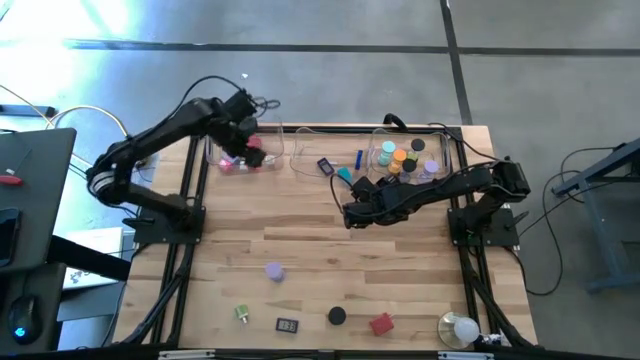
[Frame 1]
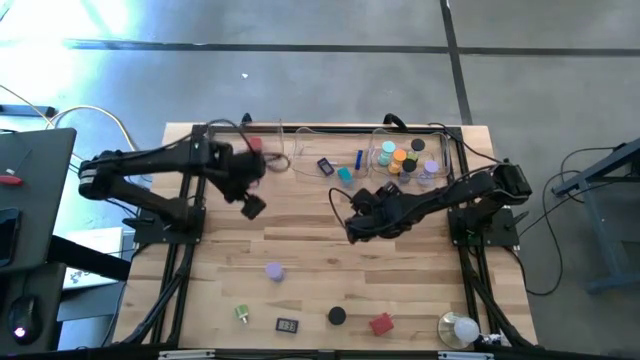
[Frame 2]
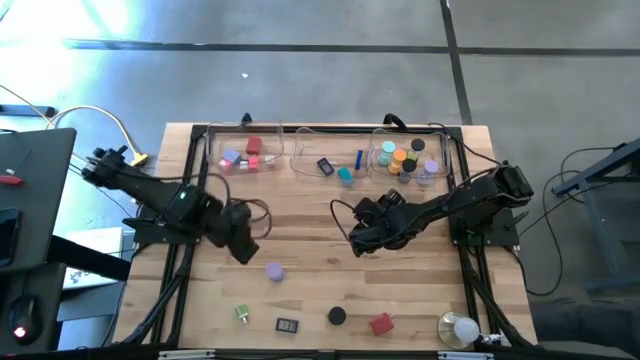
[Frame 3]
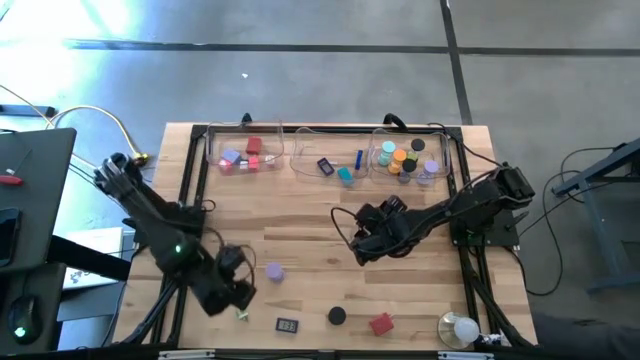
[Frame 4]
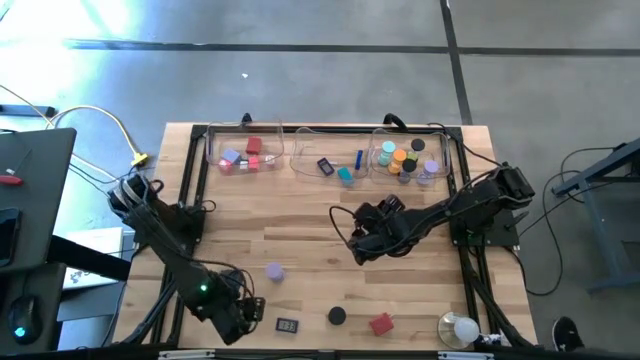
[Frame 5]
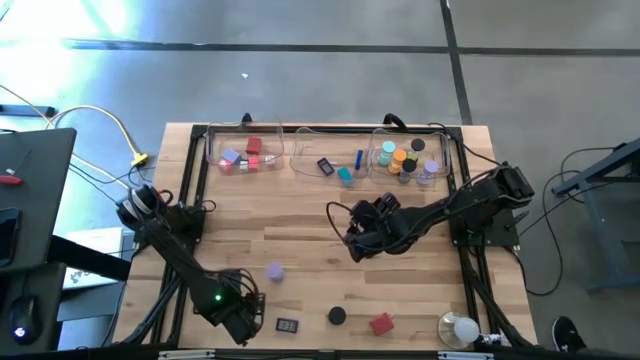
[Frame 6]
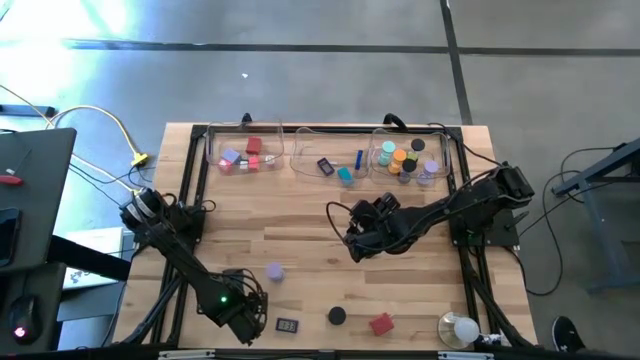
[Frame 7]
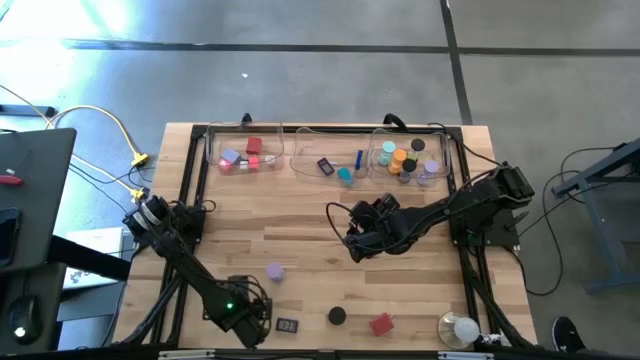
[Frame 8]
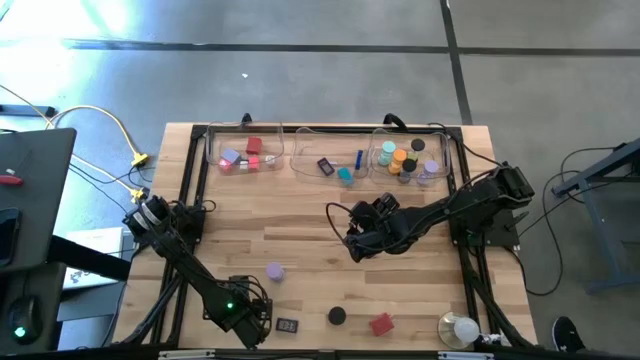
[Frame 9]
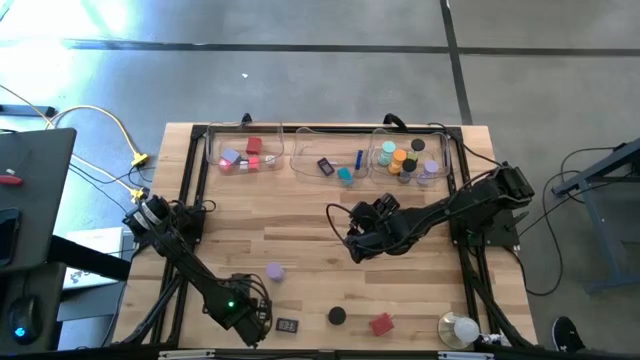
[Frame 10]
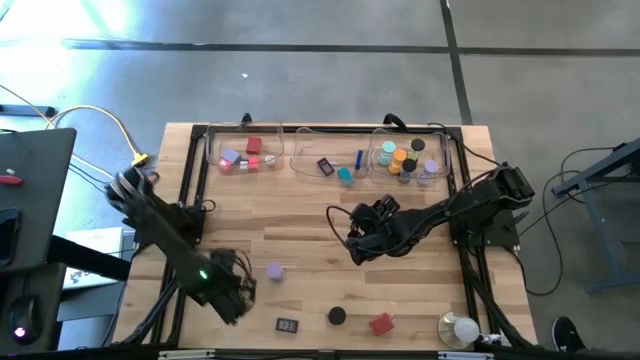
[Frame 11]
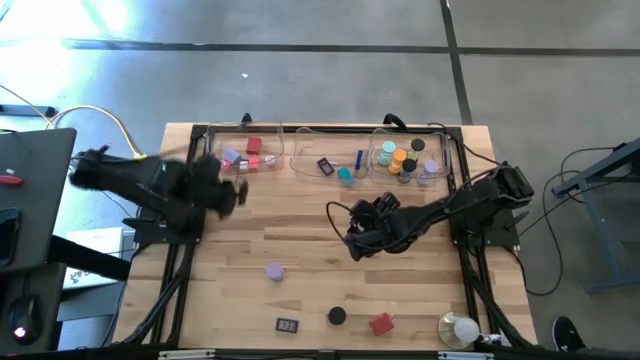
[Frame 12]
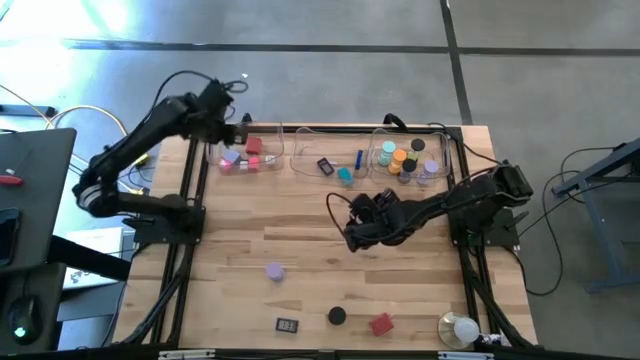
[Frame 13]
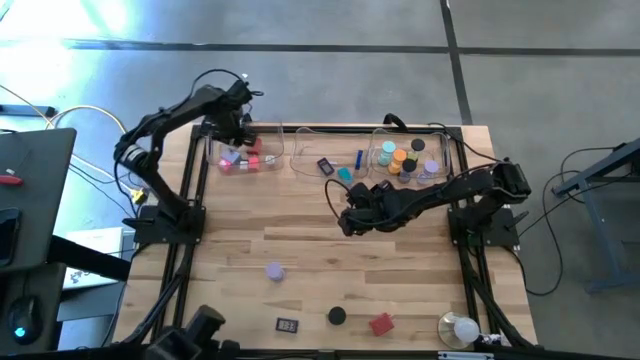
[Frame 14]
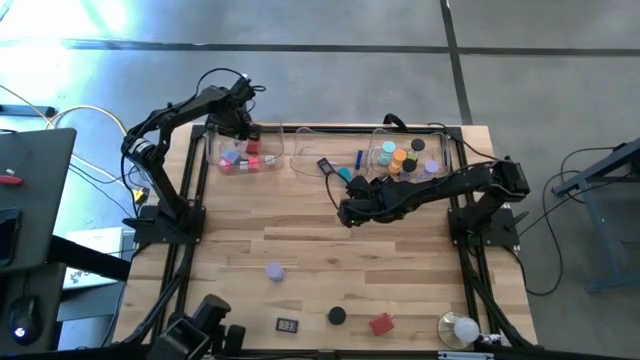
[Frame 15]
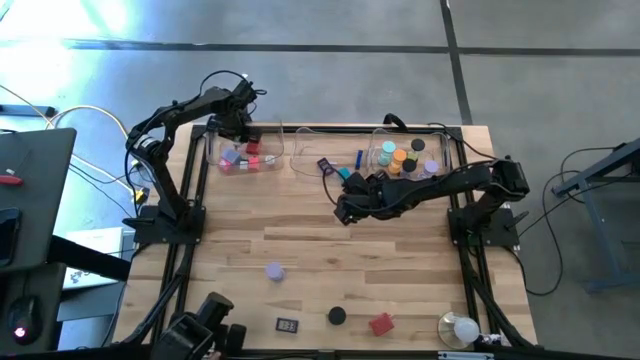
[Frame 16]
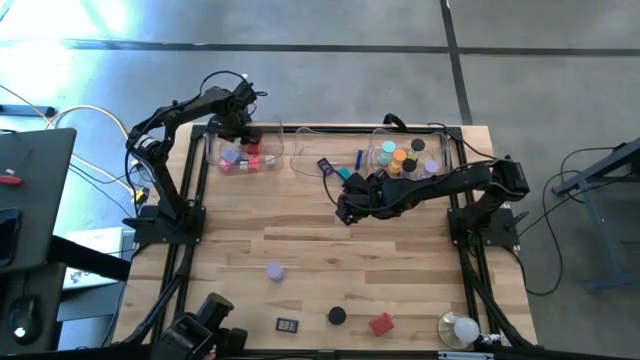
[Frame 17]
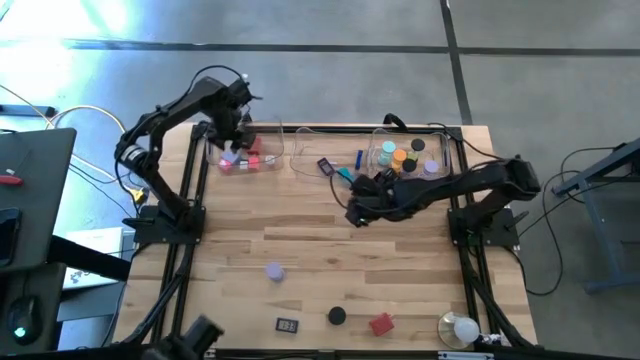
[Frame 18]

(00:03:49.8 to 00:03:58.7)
Task: Pick & Place Office items
Put the green charger adapter into the left transparent bin

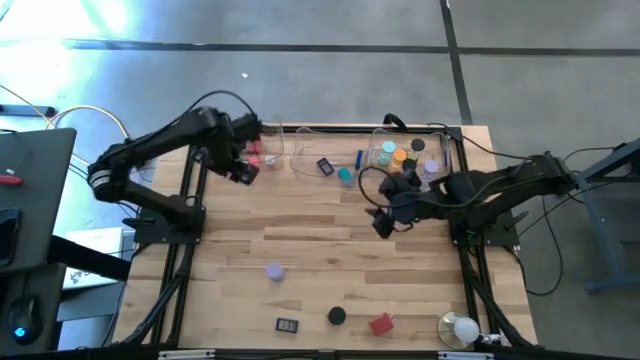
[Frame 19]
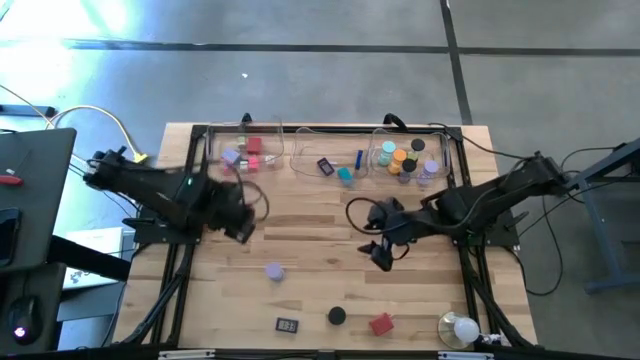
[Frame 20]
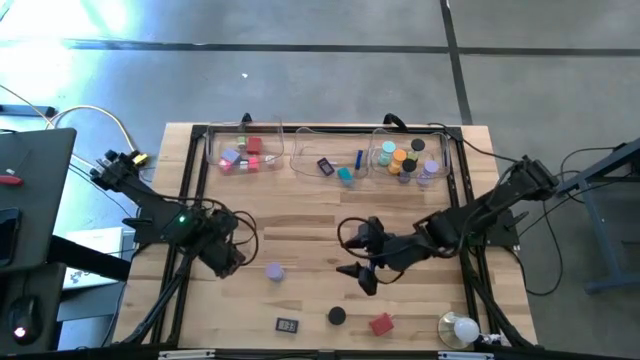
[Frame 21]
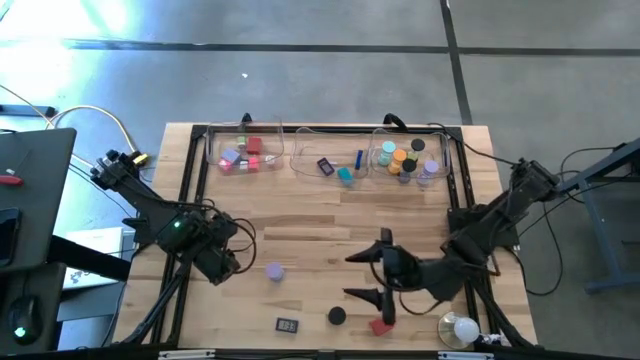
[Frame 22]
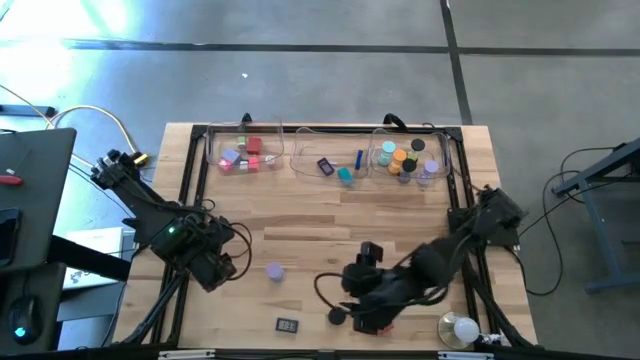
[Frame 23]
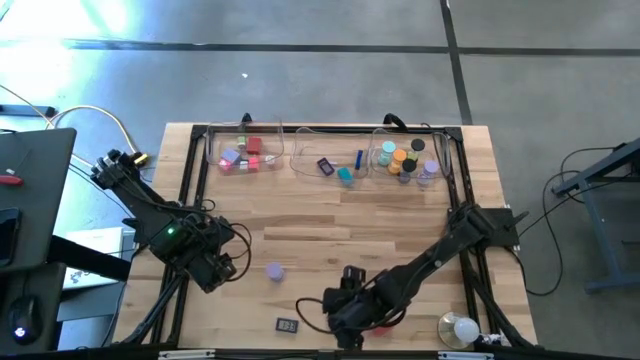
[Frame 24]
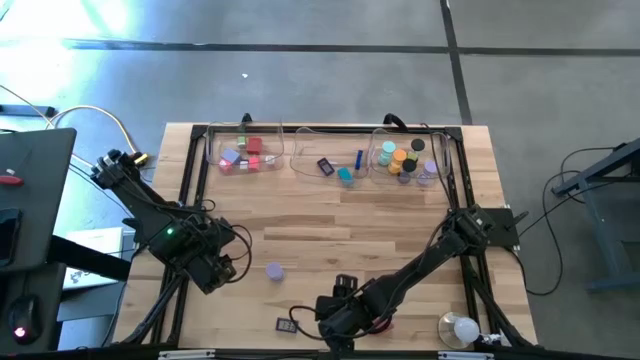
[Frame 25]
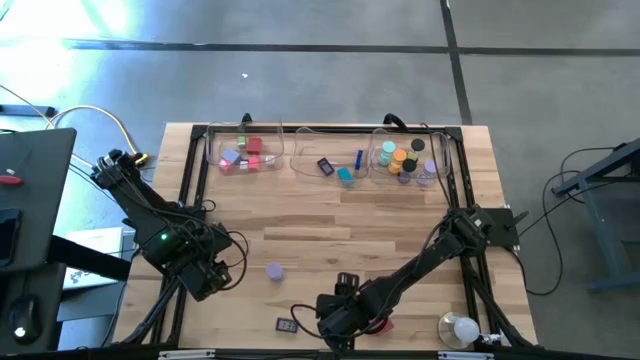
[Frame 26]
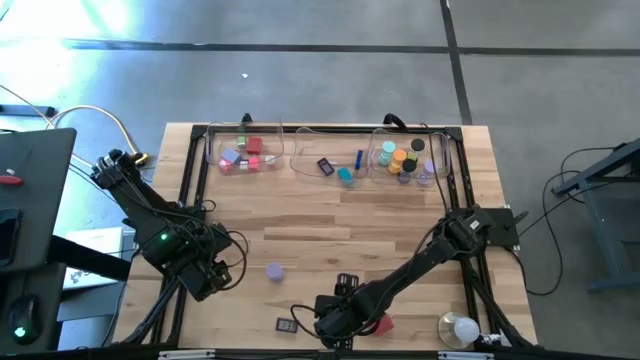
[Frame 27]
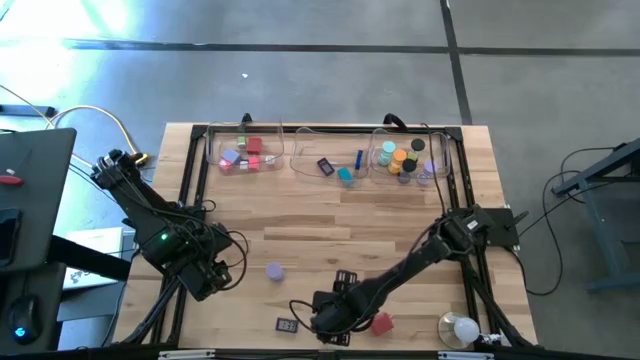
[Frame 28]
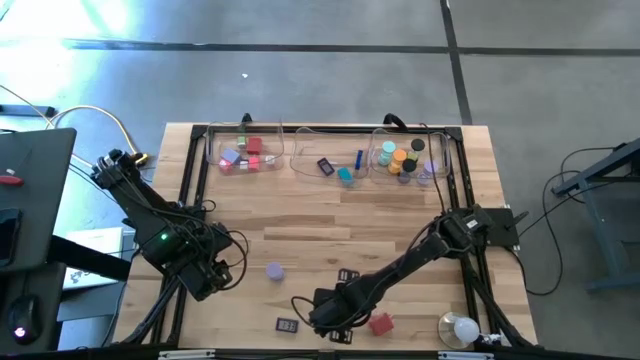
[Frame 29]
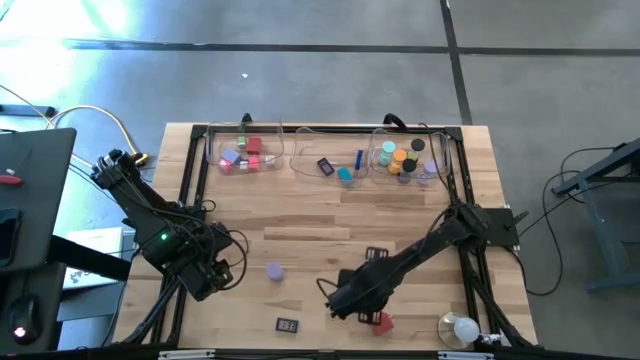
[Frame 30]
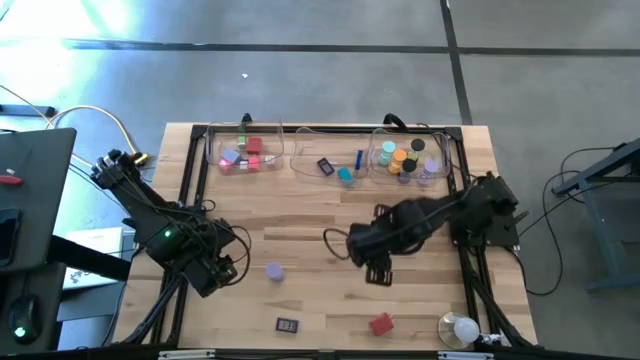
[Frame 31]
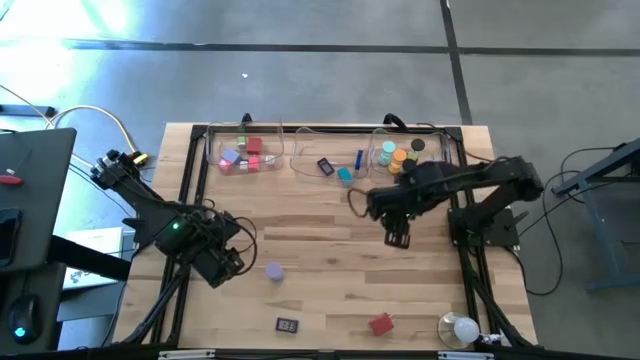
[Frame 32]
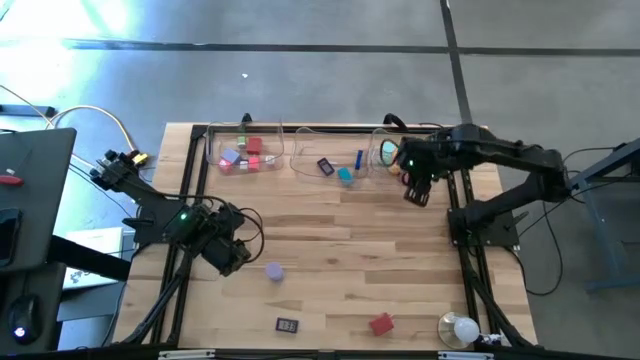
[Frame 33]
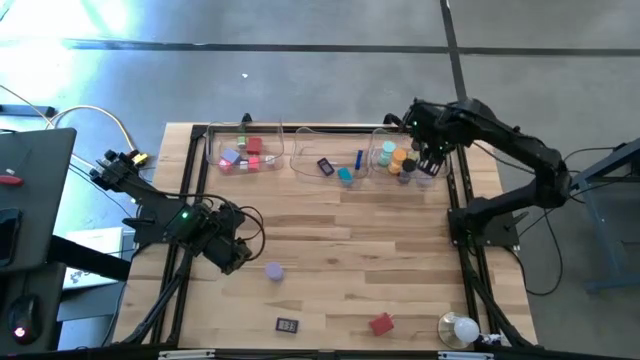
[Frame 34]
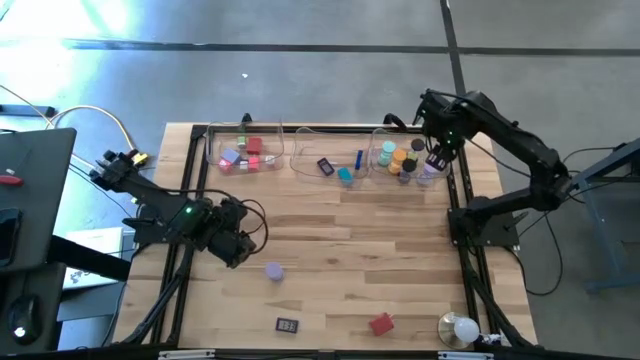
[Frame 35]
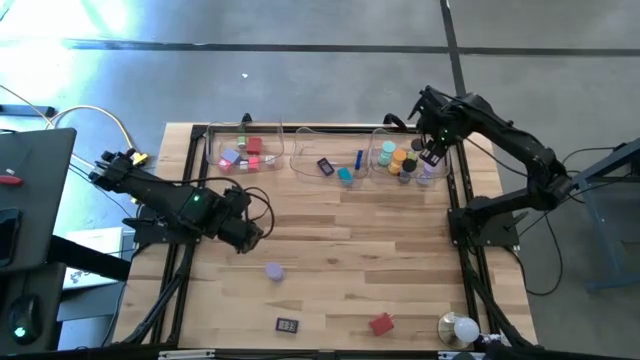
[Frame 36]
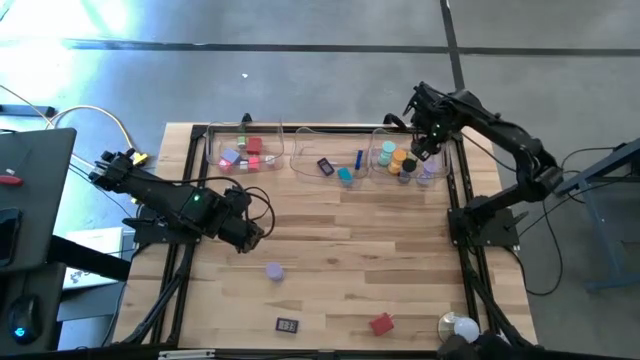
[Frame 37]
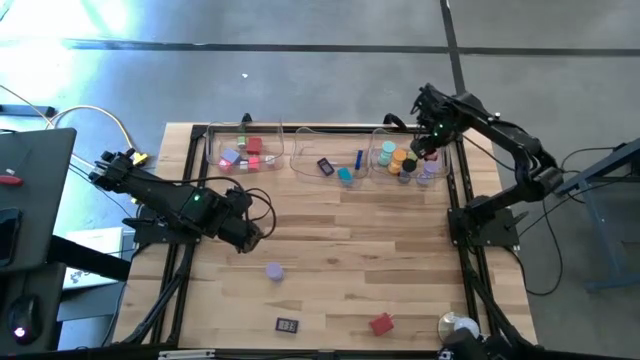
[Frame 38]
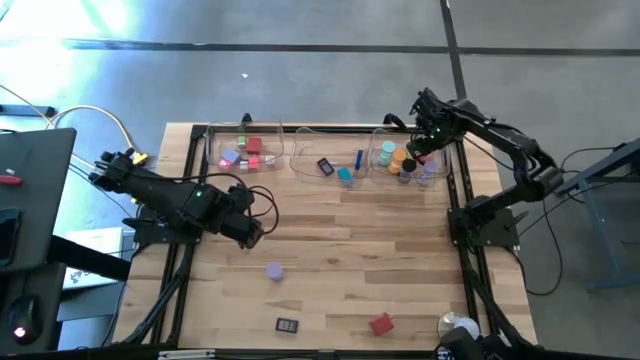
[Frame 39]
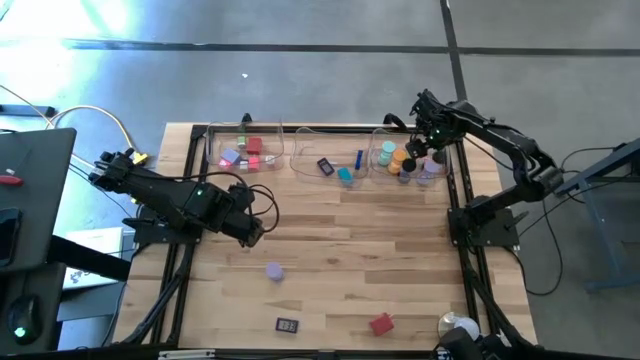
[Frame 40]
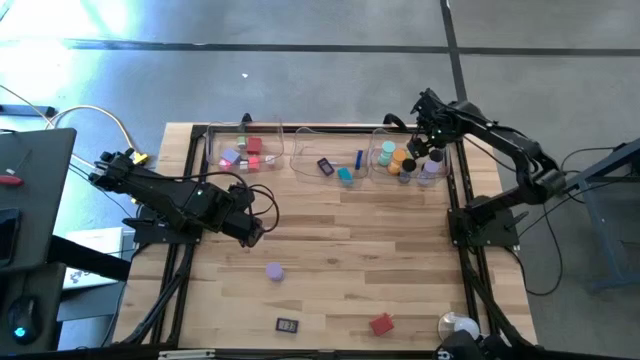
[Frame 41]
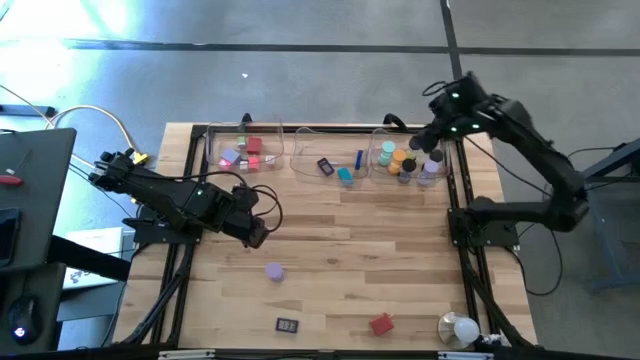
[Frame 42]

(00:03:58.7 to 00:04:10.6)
Put the black hourglass into the right transparent bin
